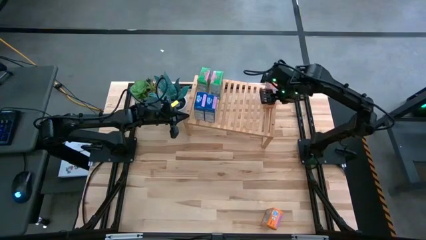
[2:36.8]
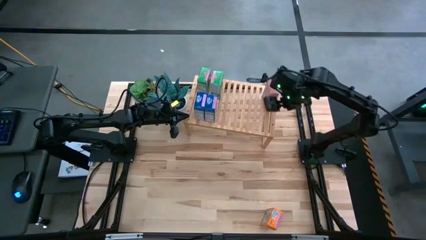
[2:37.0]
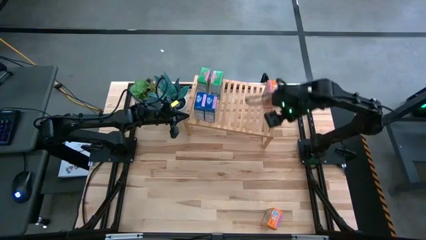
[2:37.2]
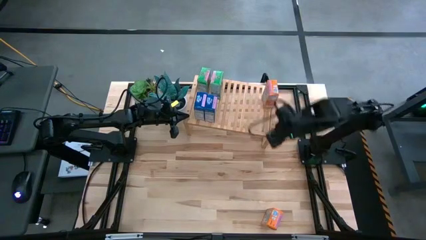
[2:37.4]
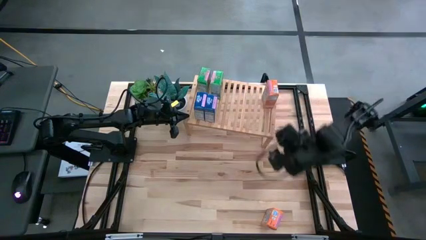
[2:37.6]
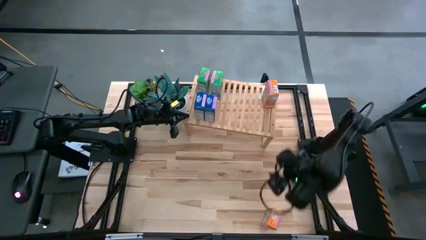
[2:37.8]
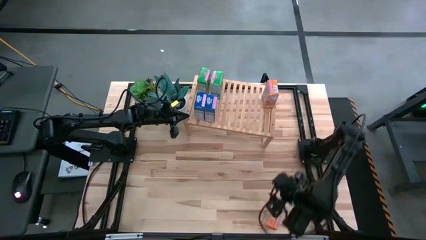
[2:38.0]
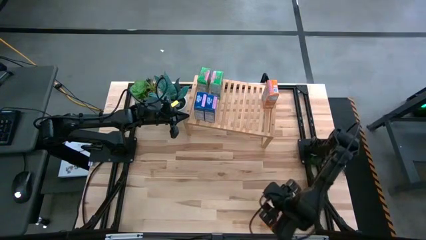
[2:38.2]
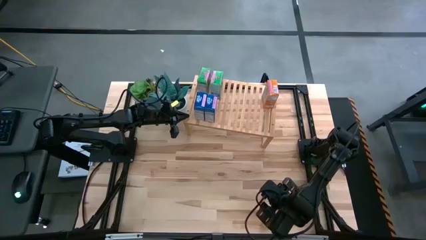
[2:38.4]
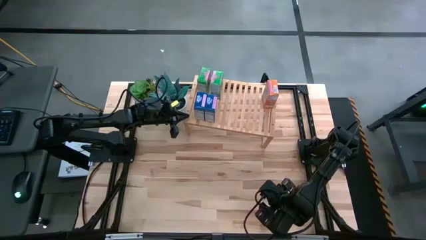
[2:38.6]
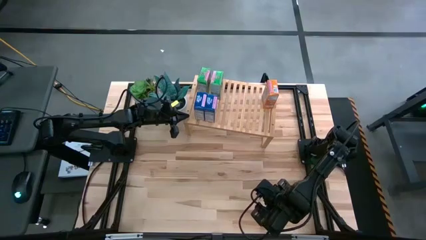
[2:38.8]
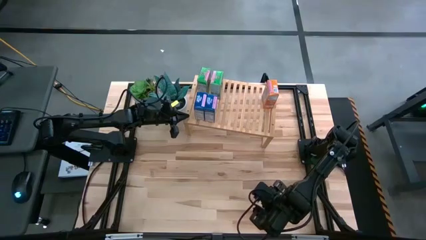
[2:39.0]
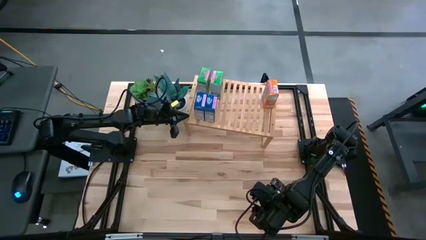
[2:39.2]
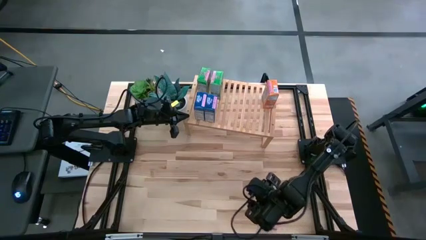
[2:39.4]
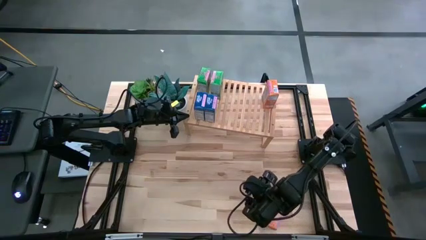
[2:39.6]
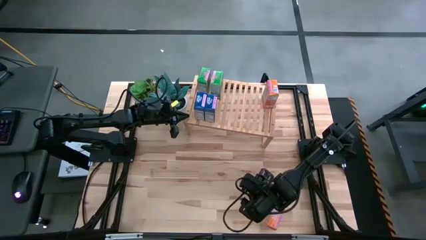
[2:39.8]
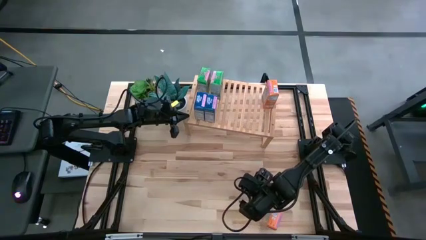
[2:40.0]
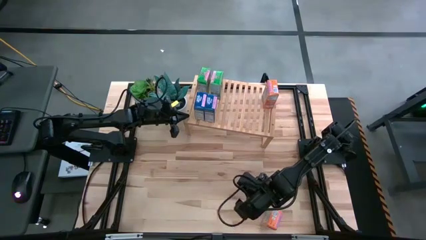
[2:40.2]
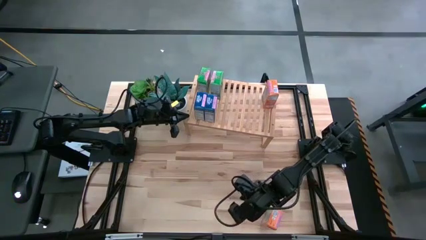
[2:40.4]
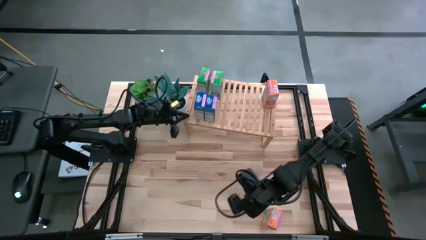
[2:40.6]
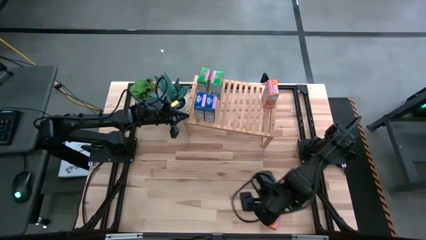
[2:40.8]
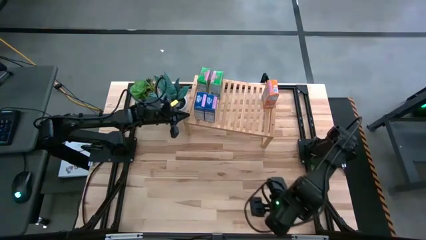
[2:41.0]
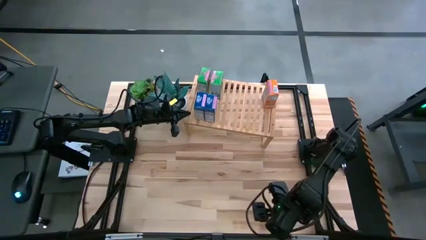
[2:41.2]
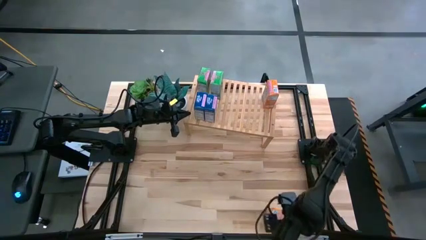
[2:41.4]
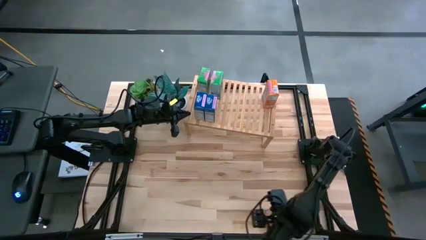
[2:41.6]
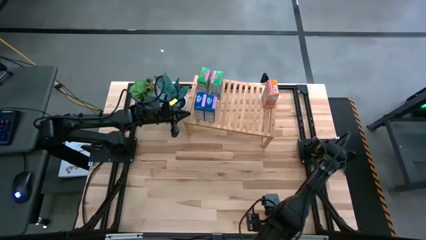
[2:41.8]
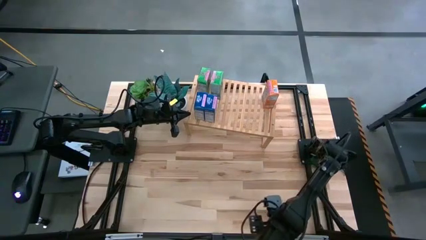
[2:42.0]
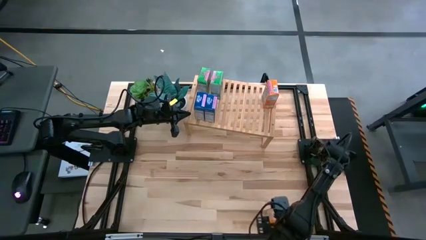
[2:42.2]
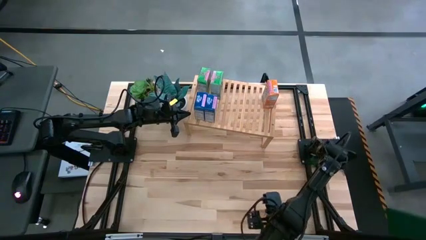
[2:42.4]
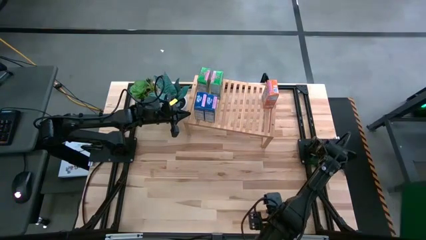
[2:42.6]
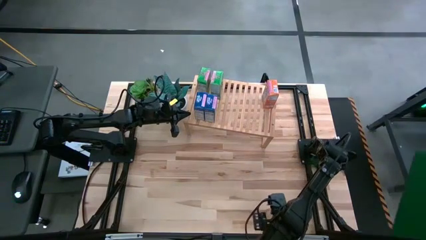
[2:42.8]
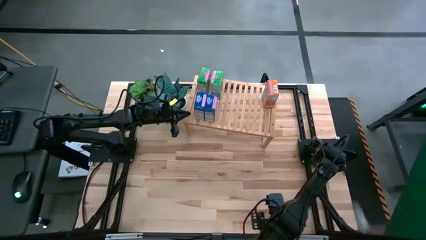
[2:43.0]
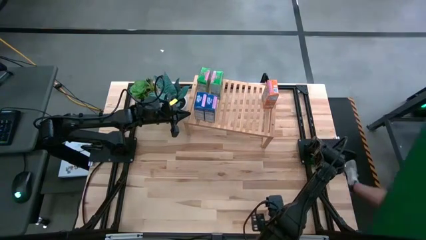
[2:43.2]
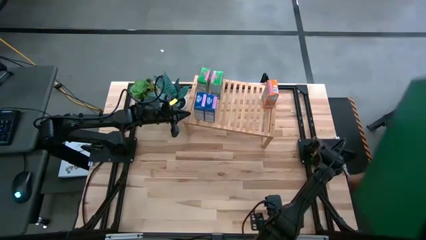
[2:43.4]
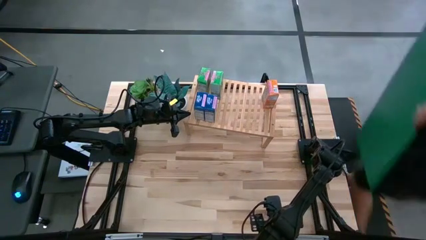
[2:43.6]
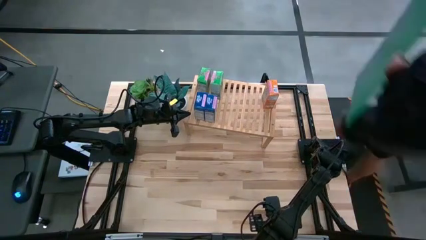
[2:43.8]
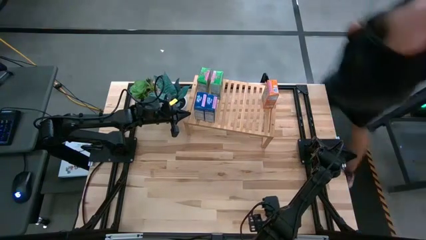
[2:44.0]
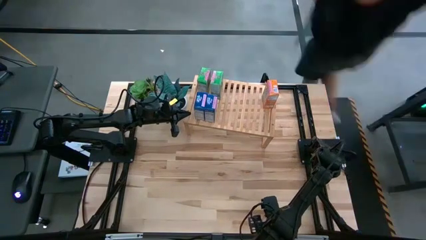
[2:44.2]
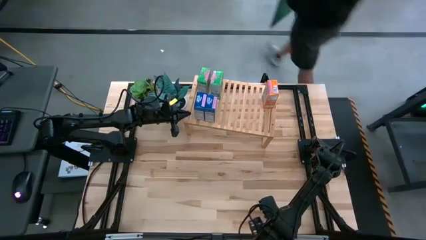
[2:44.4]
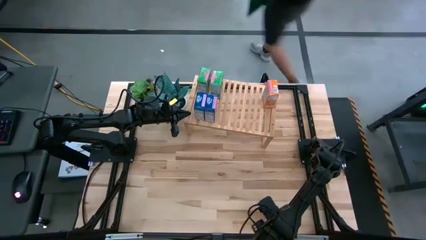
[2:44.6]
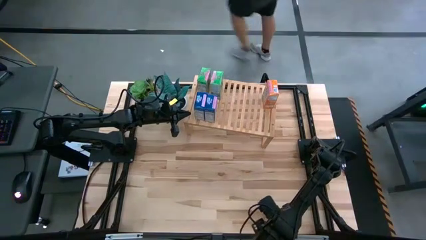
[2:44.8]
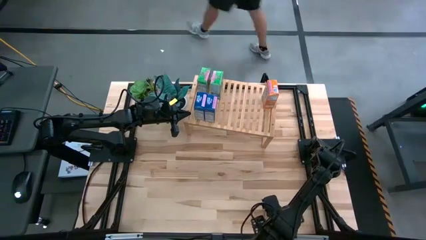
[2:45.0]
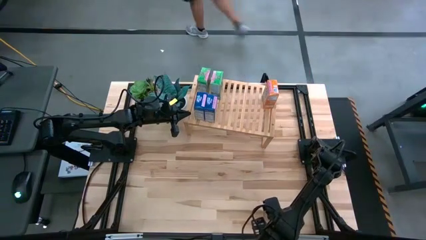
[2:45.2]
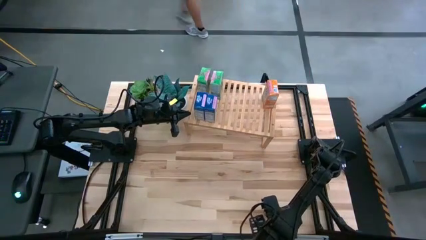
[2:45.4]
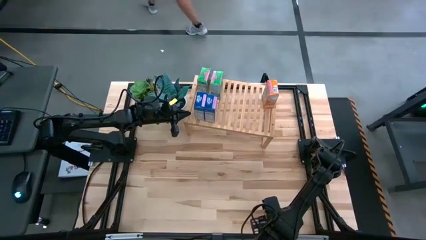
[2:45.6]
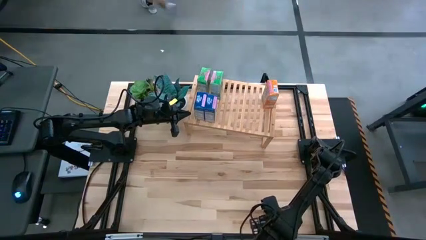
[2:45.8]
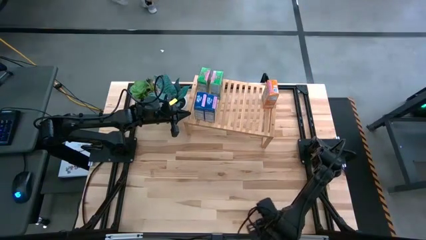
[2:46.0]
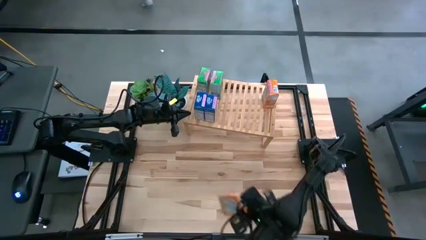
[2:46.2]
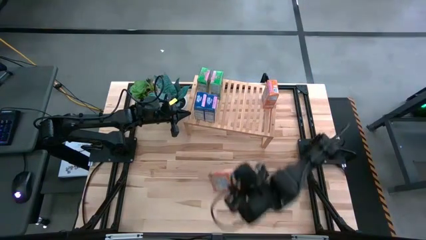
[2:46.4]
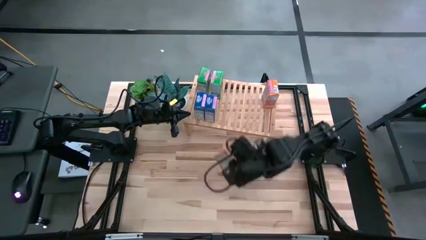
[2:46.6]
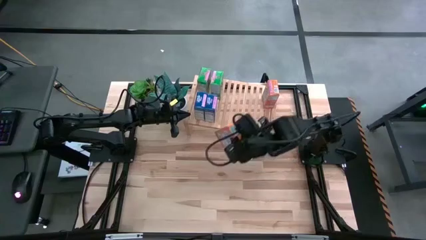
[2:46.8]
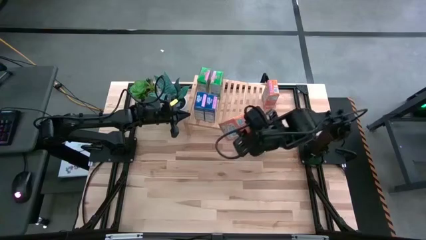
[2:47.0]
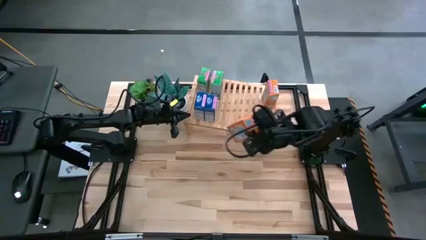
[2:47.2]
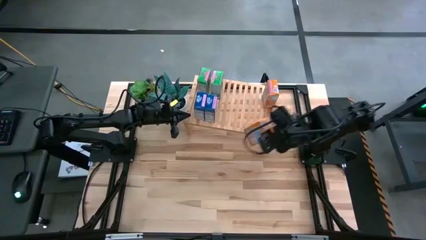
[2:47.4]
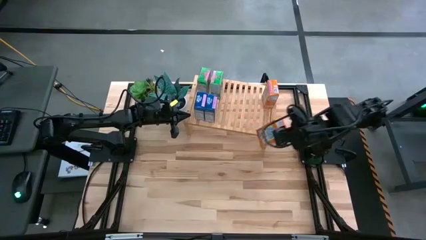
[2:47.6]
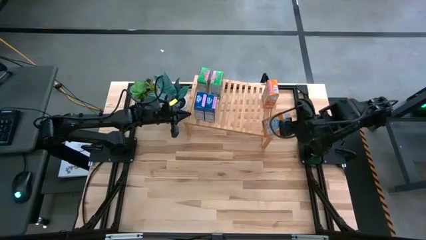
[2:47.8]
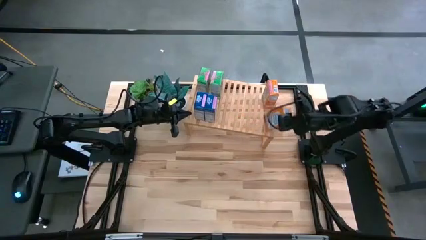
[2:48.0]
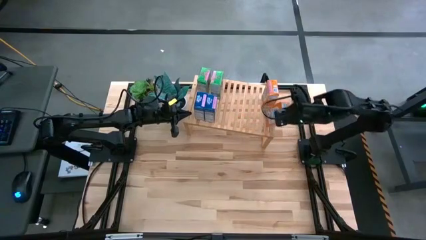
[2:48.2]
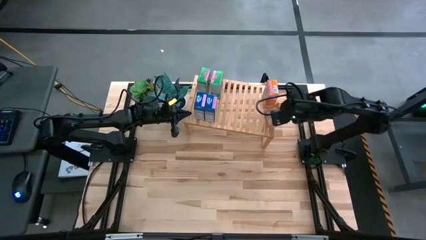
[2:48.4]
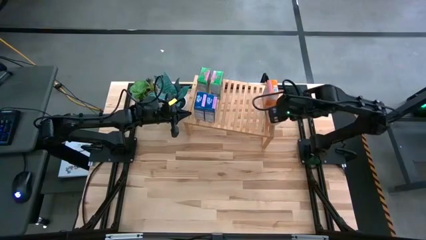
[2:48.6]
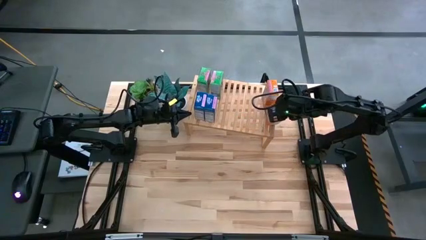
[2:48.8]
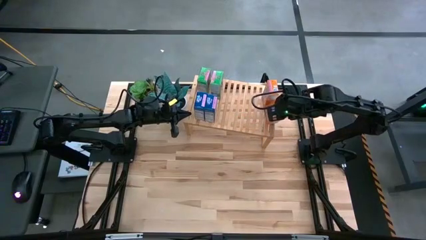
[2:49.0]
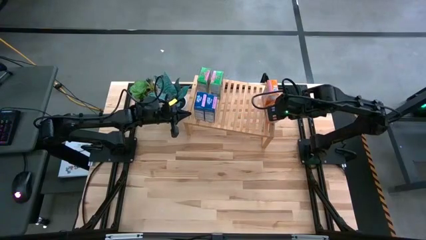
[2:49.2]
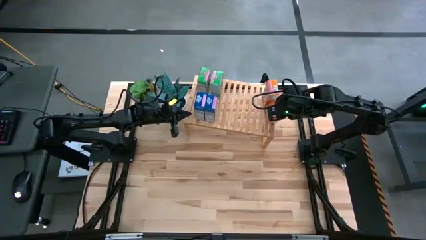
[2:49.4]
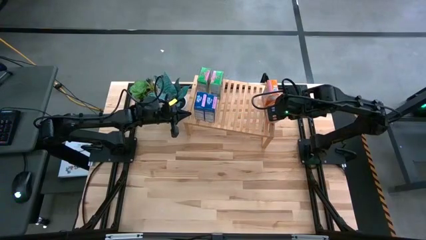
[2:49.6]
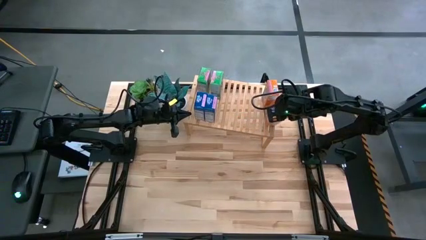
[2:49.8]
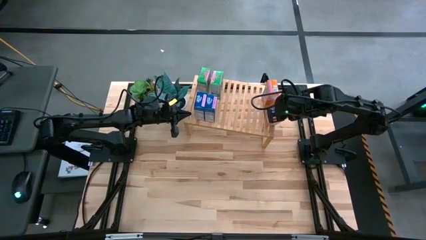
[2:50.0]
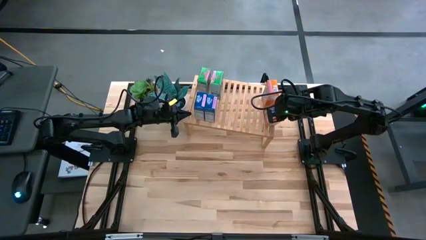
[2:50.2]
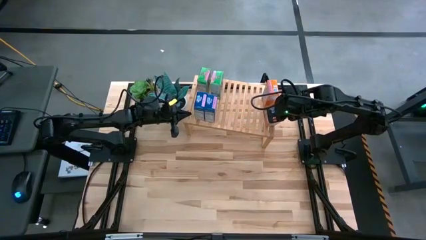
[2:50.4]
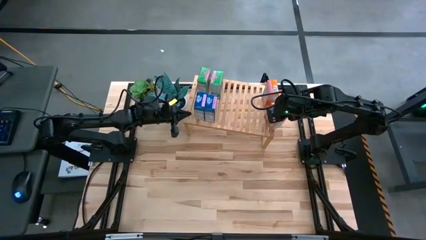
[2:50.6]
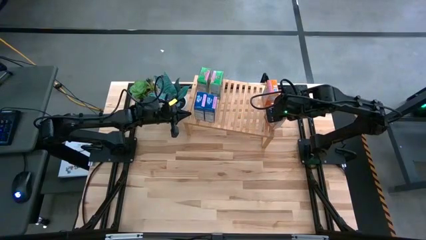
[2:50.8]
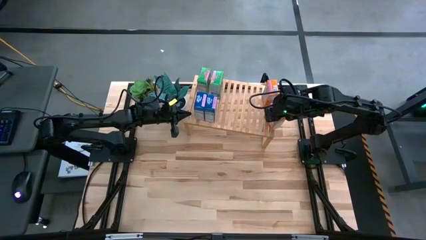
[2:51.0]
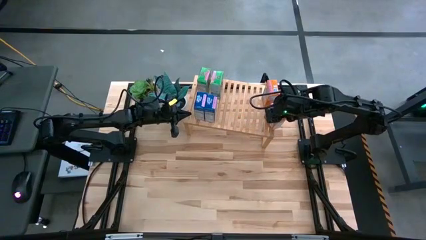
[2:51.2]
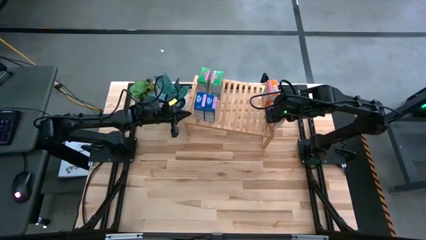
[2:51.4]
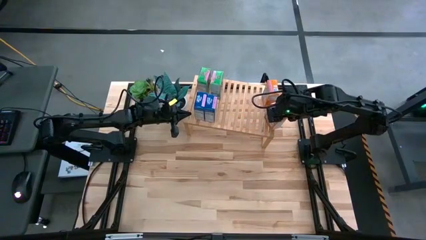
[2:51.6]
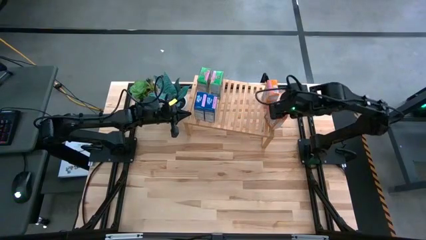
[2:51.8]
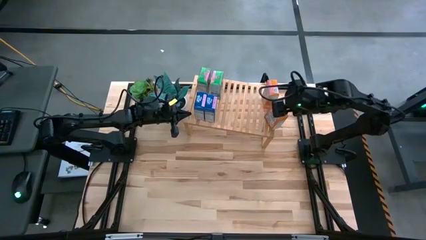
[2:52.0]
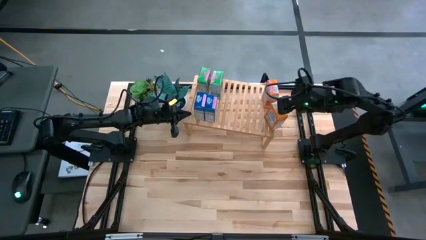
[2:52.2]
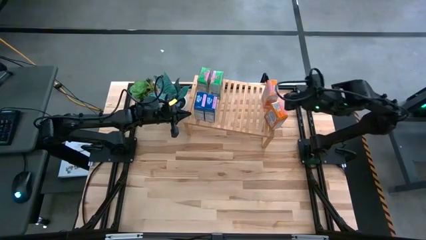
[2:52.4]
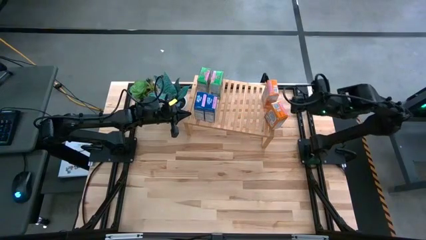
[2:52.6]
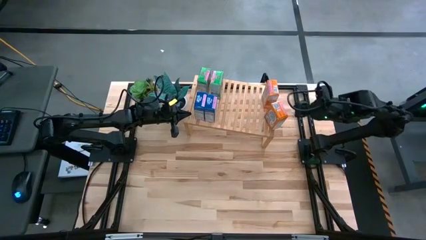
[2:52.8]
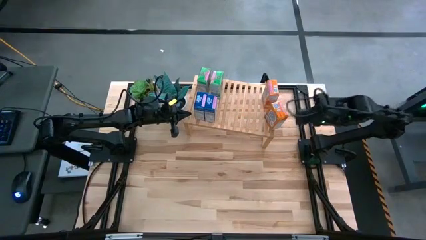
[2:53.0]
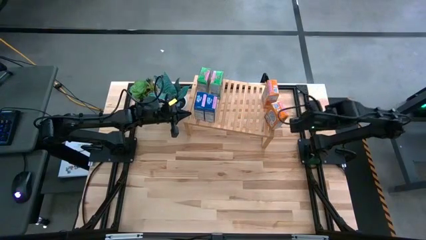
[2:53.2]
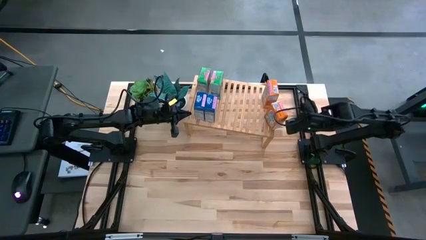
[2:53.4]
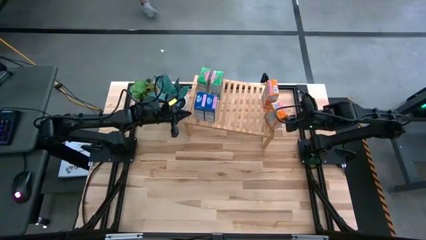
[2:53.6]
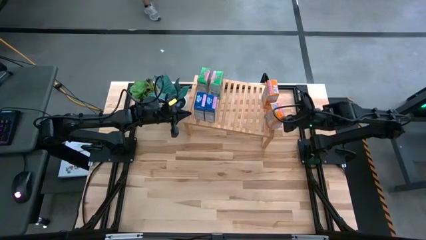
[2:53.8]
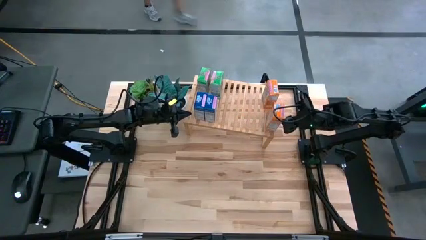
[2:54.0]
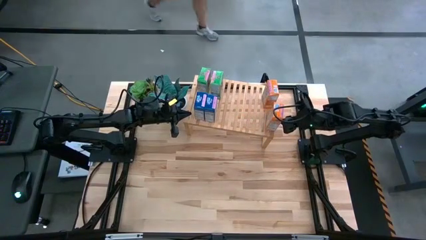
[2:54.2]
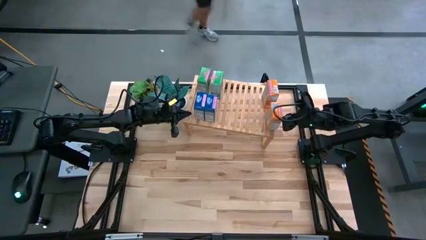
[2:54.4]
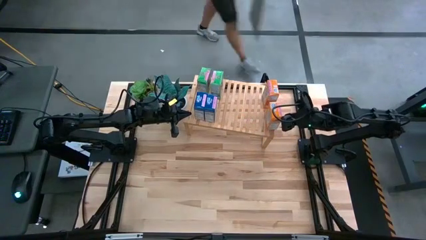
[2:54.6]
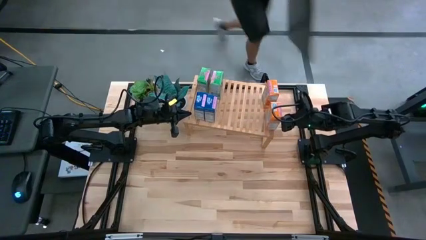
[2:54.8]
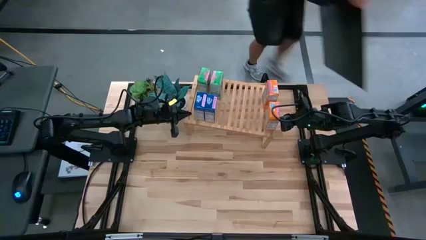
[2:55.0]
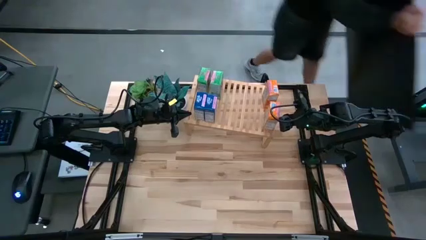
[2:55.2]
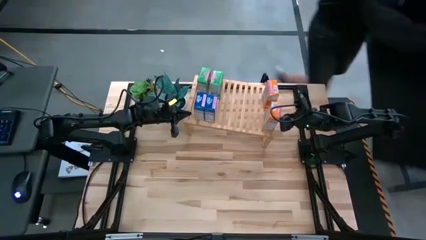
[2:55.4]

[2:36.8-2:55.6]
Task: Stack cereal on shelf
Put the orange cereal box on the shelf aligned with the other orange cereal box
